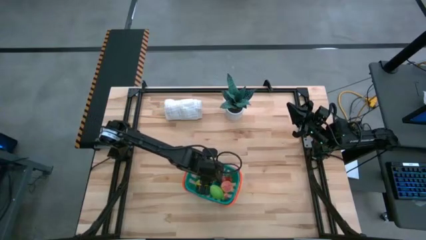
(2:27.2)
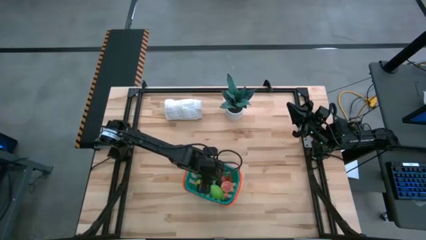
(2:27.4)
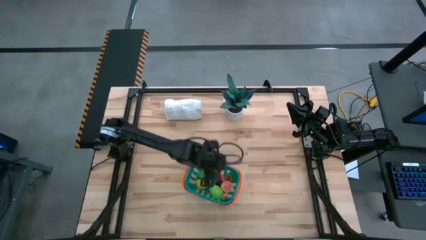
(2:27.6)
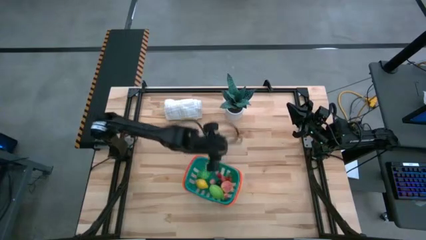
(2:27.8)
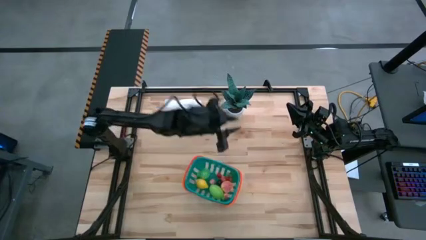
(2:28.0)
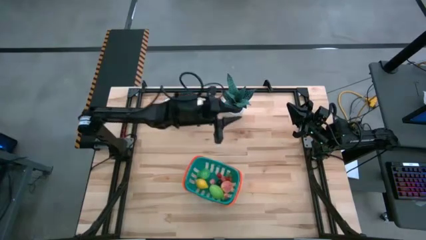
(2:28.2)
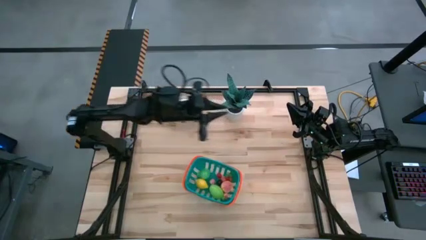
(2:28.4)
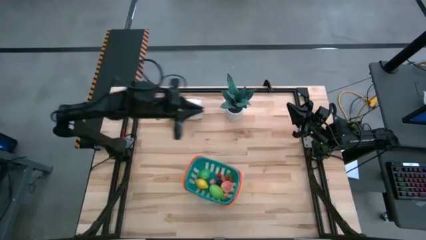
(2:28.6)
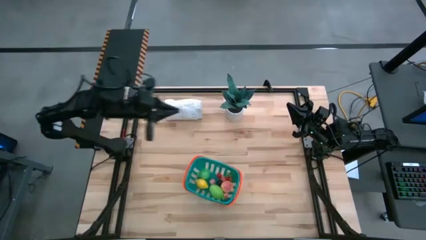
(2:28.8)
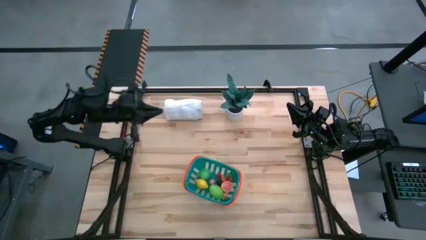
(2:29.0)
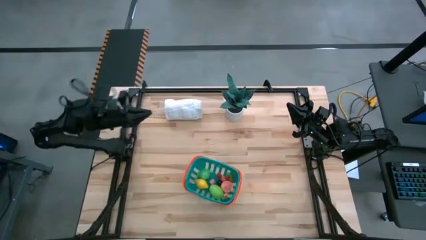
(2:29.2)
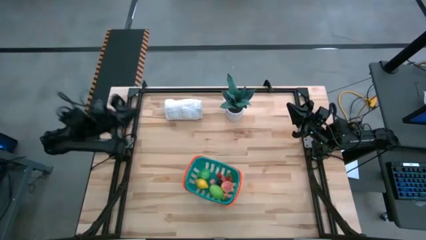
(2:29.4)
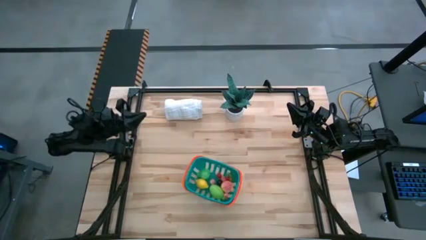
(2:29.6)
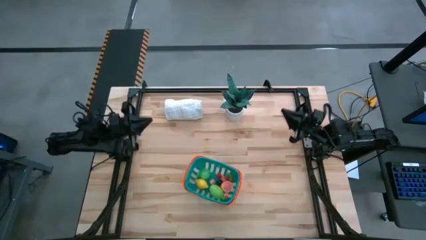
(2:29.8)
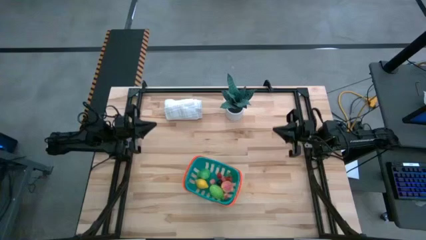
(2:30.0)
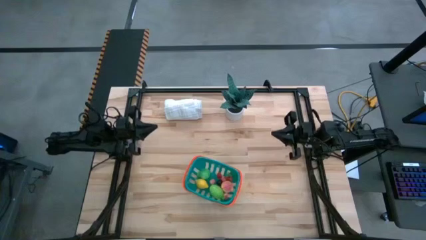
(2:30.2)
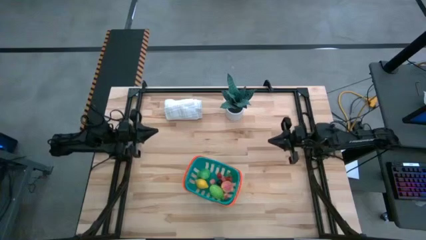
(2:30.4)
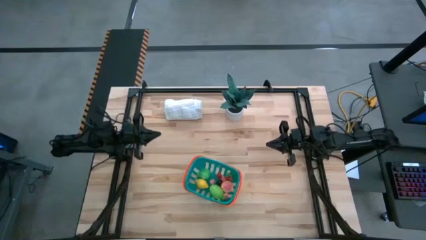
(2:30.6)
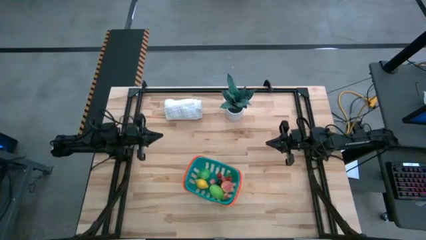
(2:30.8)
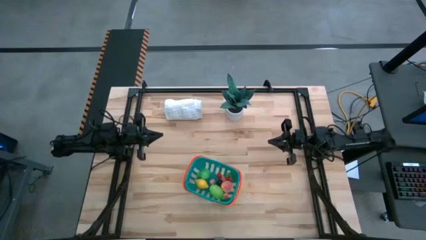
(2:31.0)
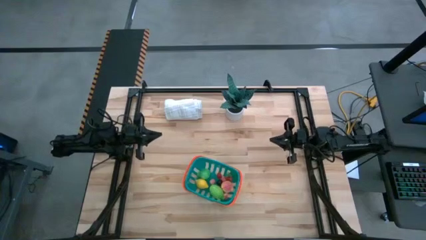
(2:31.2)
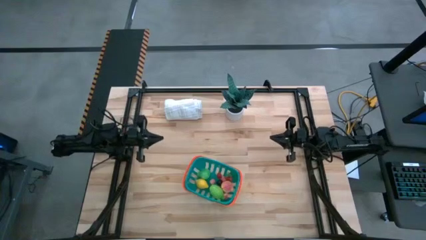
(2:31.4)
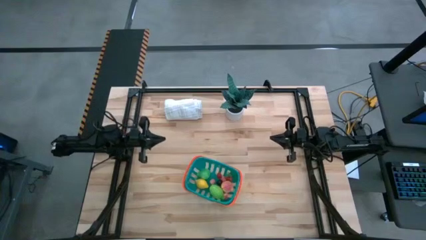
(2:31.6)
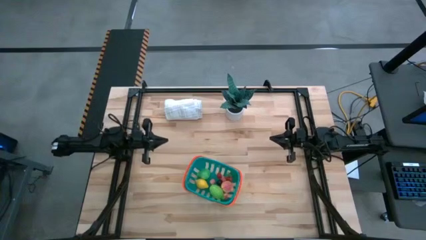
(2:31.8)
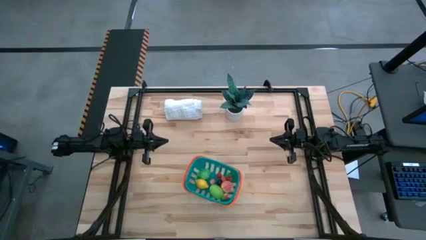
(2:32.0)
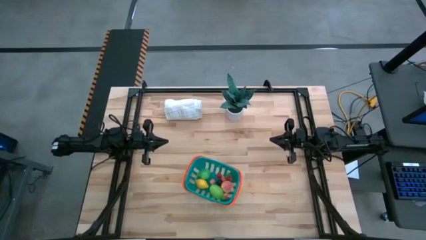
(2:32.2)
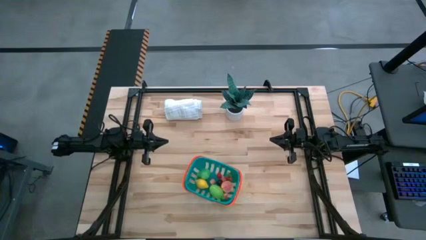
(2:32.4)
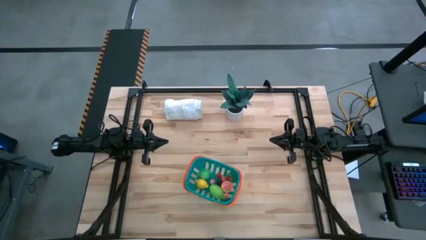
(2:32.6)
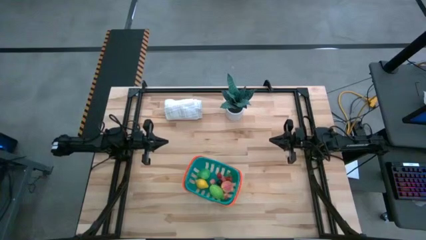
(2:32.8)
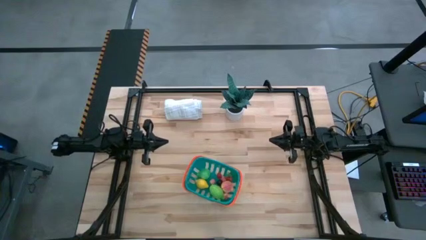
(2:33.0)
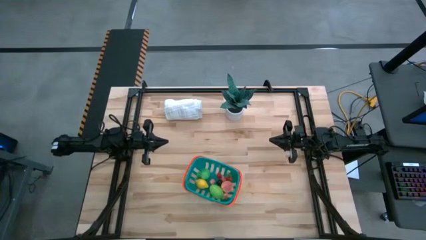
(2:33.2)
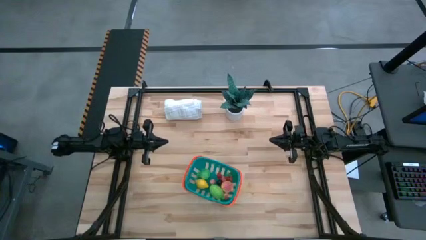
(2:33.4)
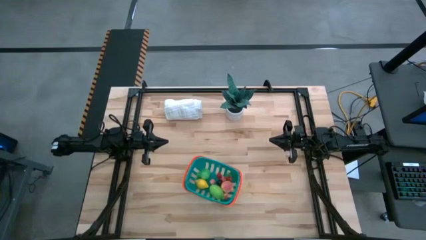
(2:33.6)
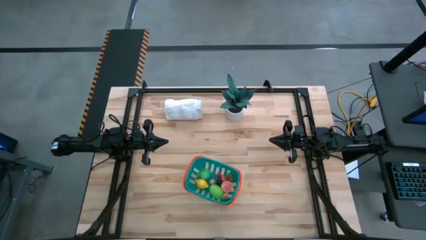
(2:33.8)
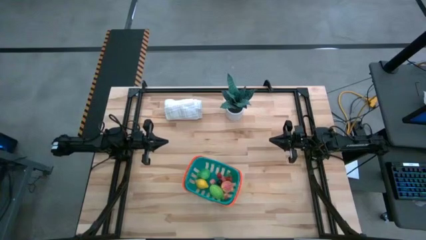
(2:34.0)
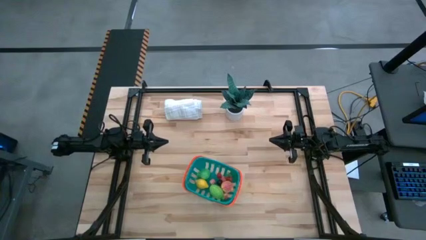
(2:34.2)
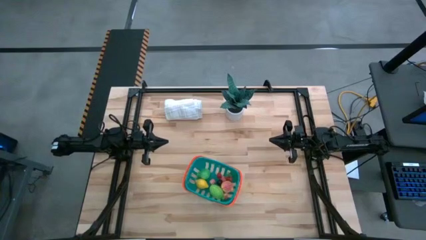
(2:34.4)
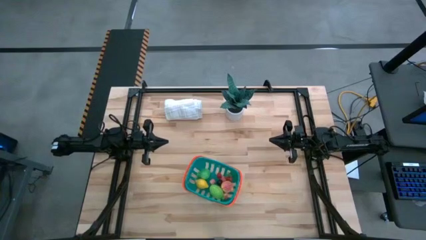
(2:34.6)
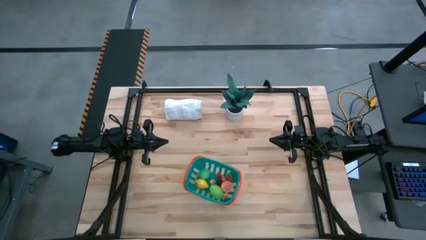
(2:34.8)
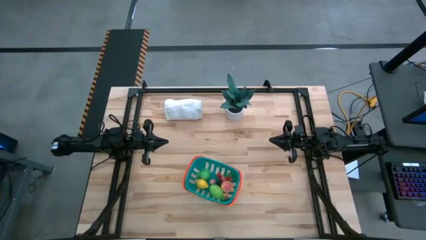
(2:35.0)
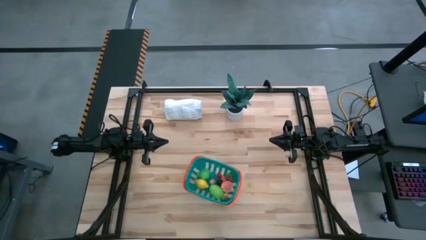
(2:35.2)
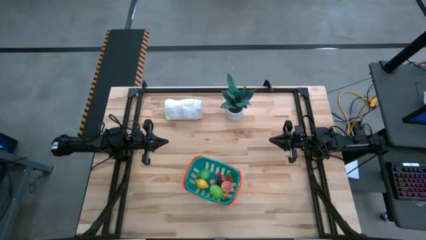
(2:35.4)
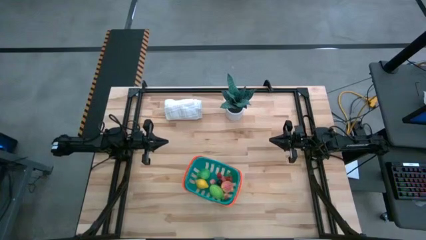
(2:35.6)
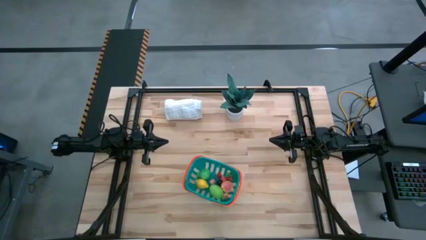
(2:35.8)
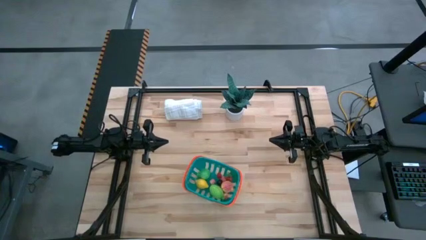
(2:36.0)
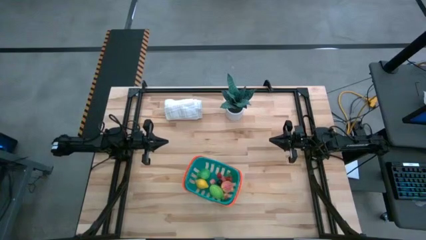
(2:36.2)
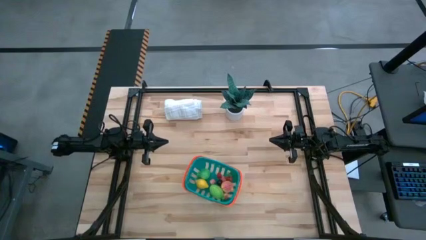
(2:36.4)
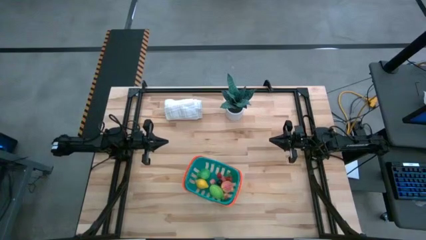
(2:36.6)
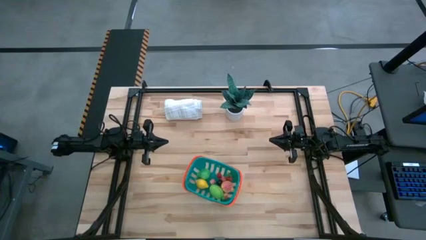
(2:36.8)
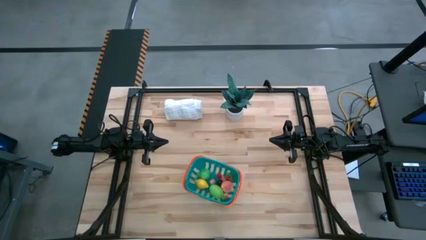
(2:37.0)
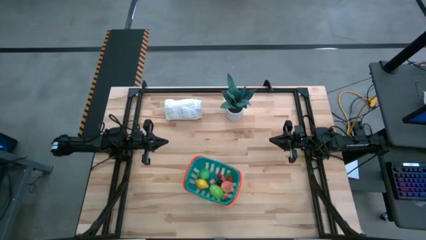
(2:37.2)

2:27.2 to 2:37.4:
Task: Pick and placing Produce into tupperware
Return to Home Position

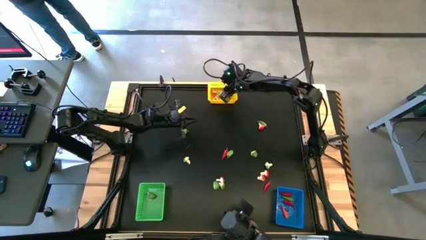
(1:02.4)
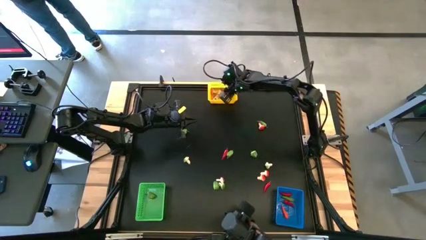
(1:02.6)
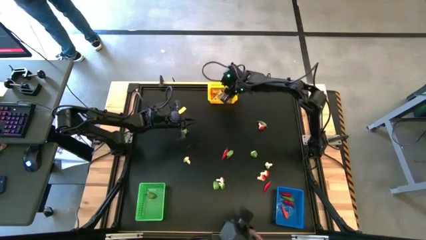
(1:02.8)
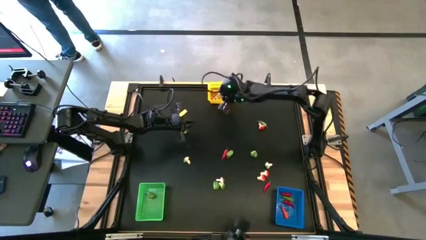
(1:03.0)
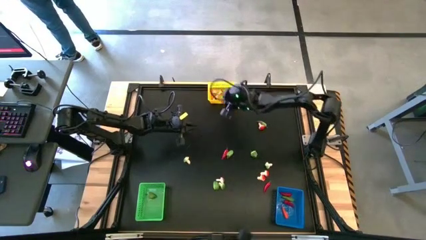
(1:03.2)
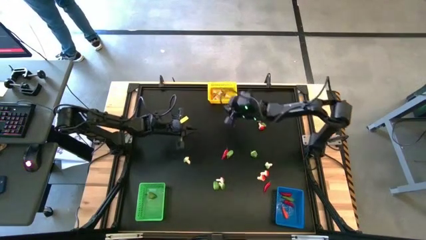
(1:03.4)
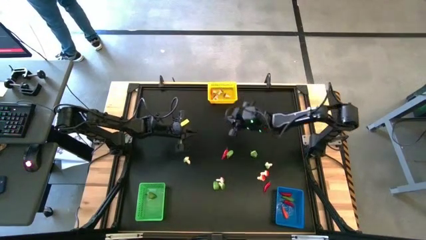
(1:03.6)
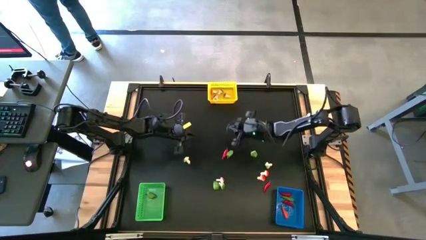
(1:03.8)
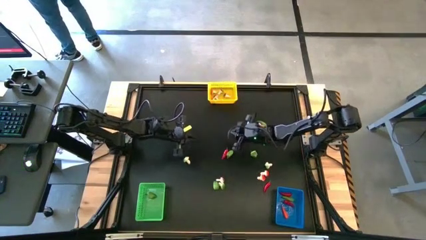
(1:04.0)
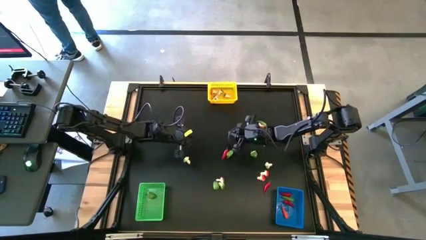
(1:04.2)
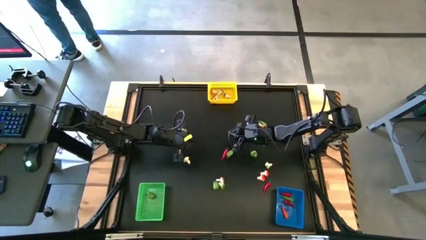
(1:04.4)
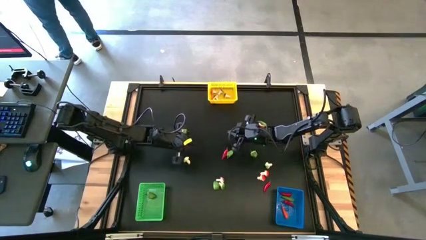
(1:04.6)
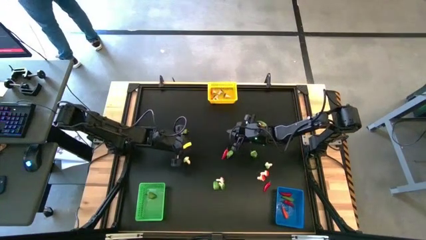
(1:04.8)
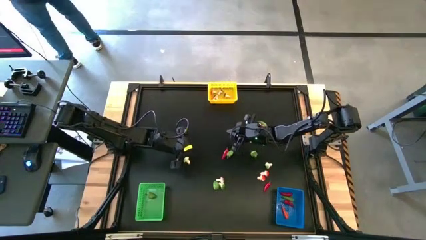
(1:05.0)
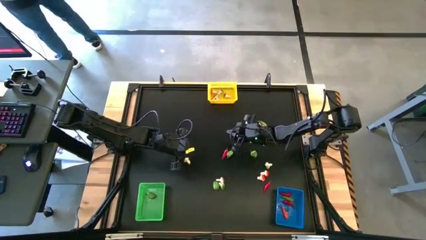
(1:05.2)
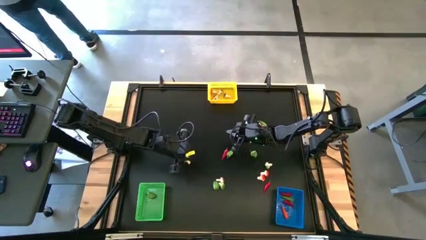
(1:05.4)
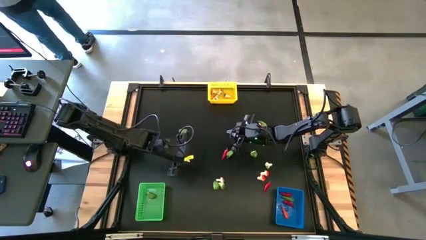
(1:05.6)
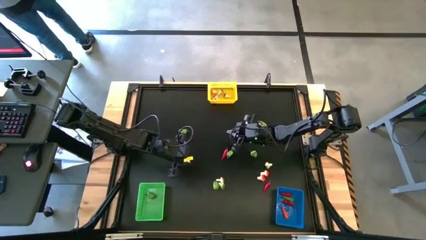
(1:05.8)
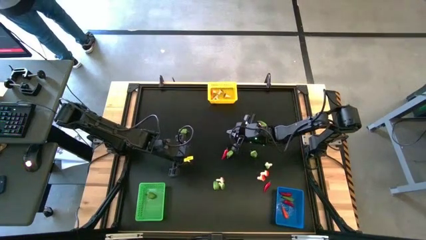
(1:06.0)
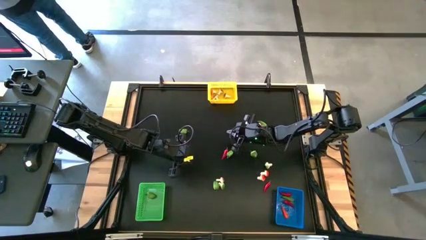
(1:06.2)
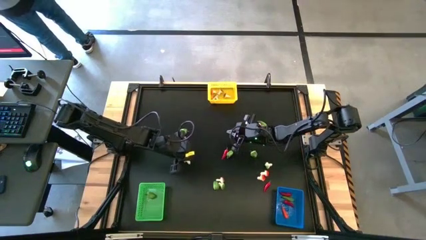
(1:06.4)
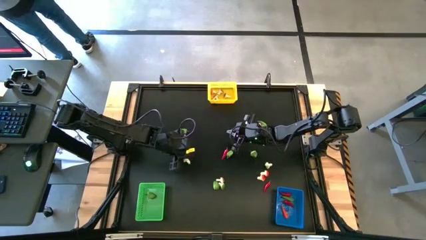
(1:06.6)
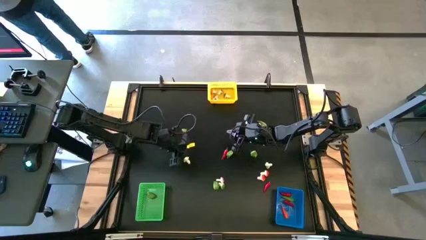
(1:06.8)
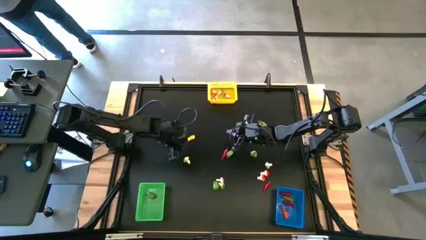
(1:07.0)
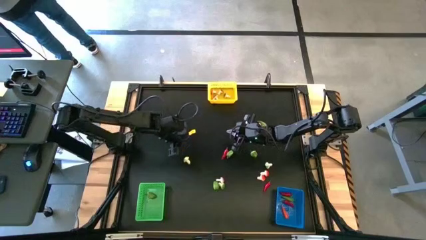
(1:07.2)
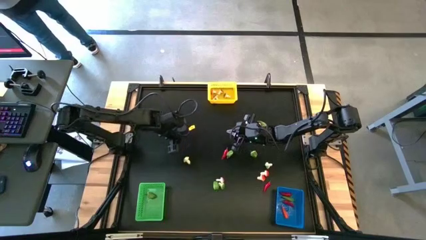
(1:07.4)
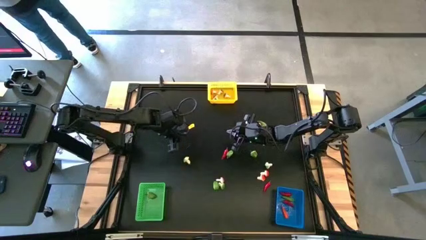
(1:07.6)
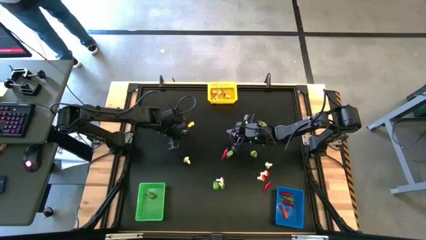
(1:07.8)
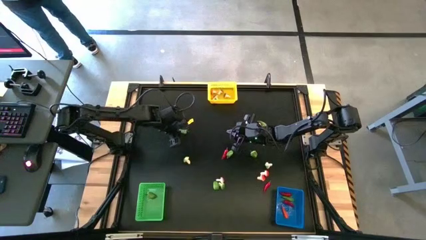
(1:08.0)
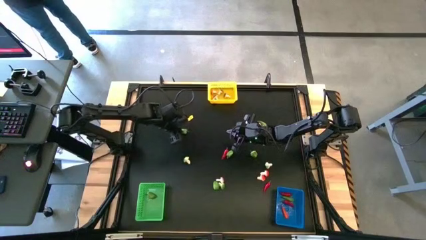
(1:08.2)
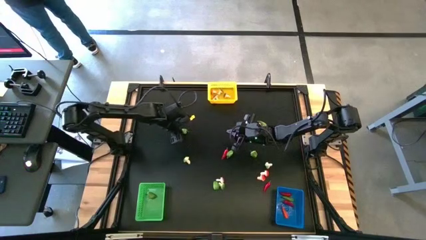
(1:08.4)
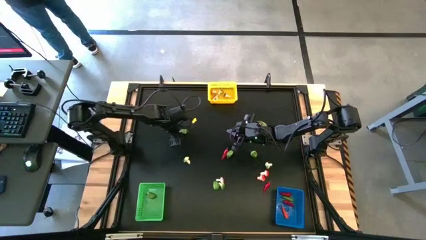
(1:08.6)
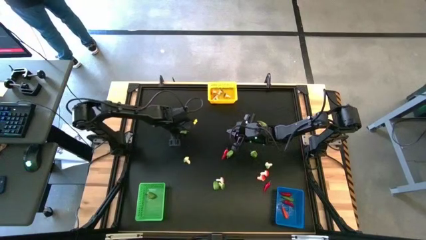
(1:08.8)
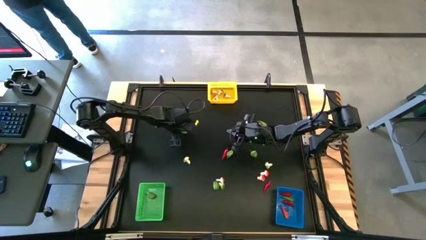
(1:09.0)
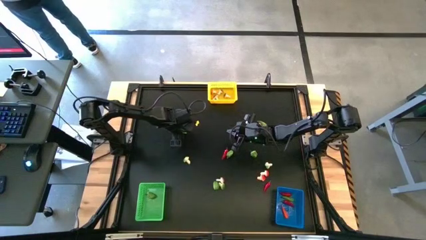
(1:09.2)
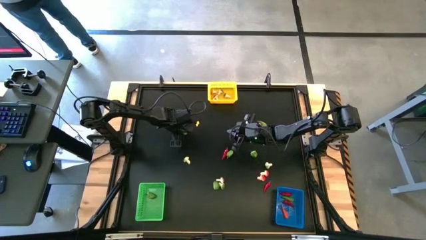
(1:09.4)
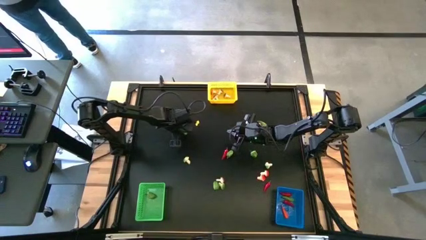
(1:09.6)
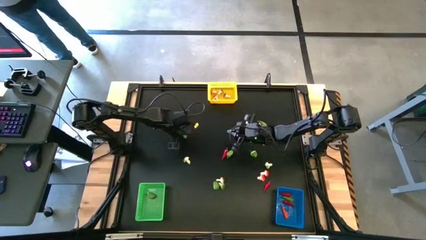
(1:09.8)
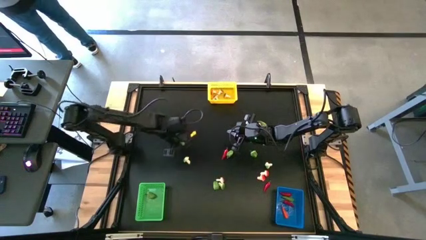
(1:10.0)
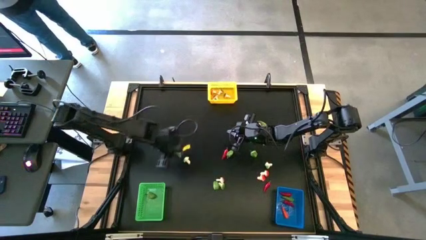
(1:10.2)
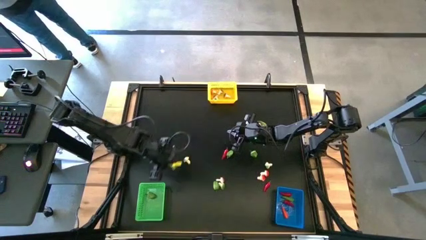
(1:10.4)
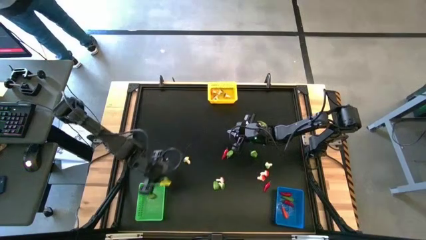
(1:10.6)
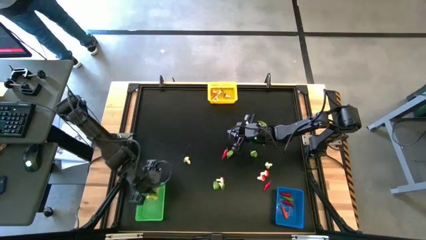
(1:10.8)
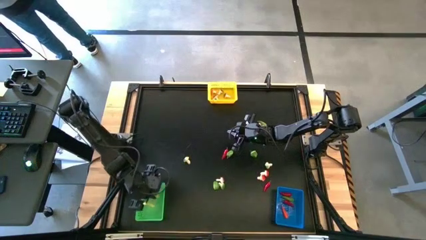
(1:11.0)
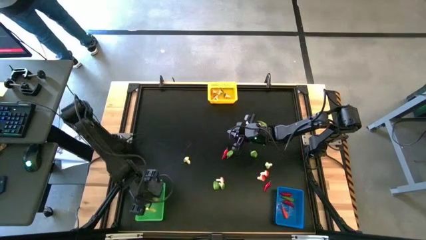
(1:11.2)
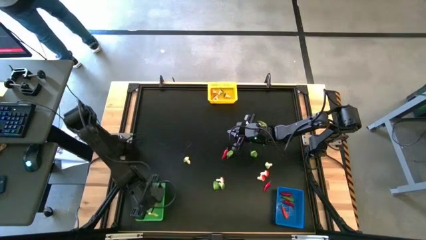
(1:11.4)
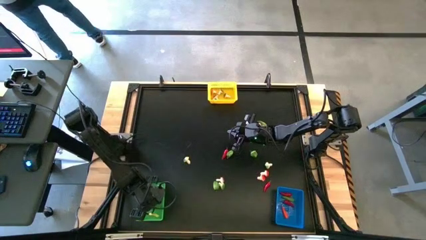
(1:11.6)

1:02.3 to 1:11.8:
Task: Sort produce into baskets
Put the top right green pepper into the green bin
